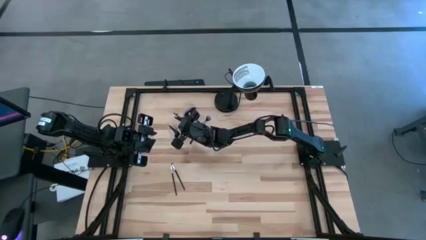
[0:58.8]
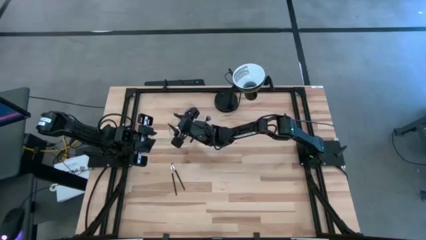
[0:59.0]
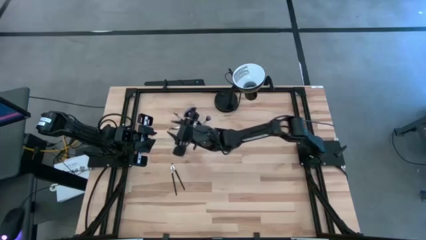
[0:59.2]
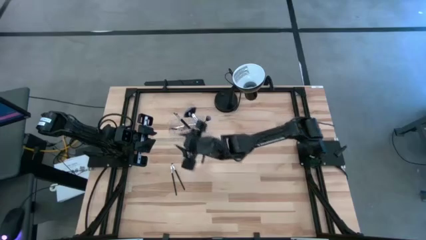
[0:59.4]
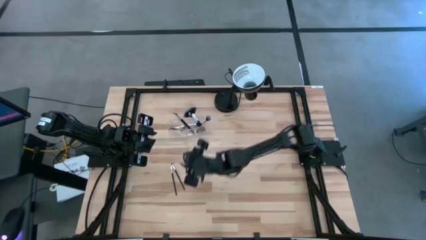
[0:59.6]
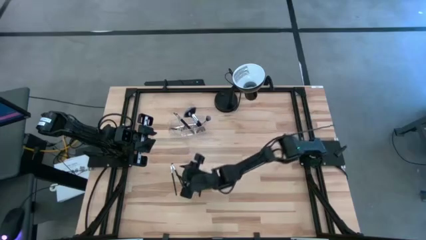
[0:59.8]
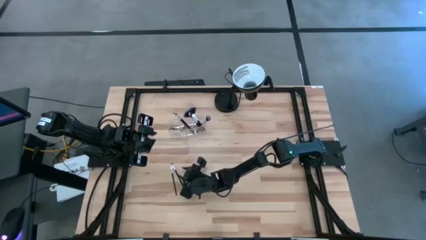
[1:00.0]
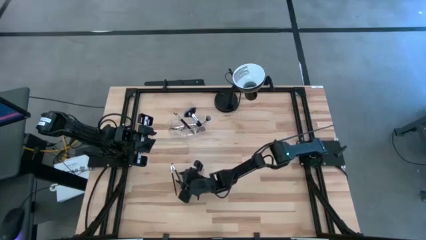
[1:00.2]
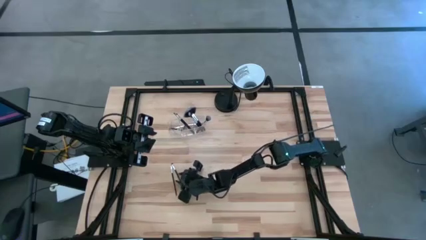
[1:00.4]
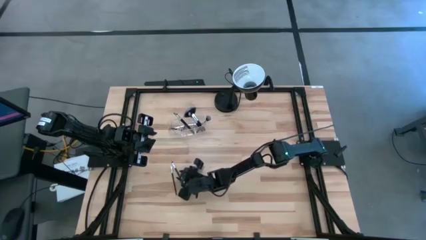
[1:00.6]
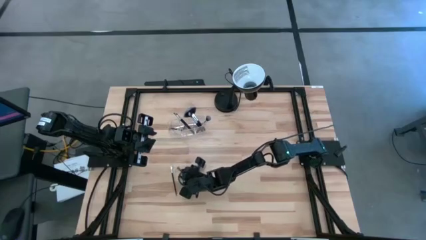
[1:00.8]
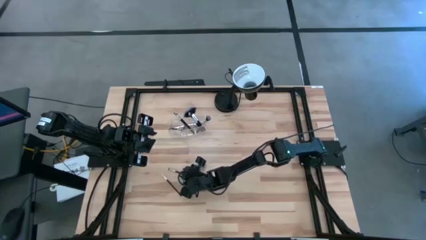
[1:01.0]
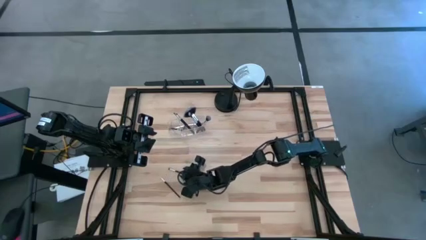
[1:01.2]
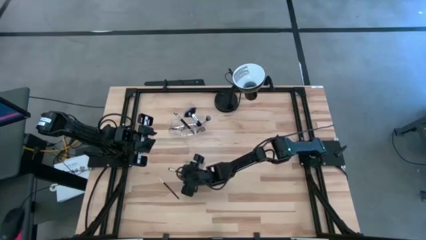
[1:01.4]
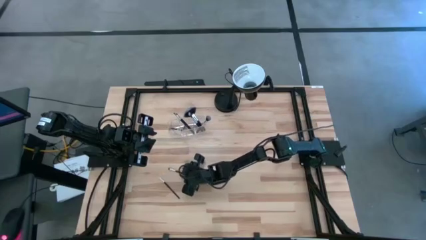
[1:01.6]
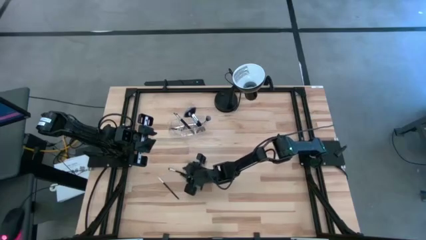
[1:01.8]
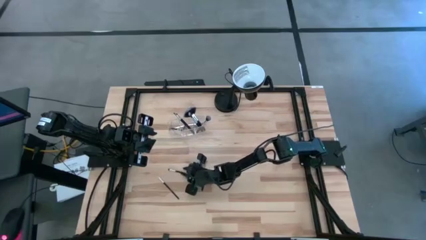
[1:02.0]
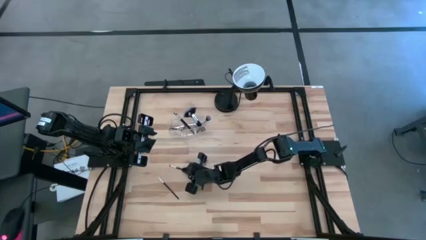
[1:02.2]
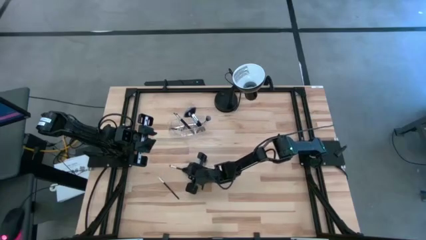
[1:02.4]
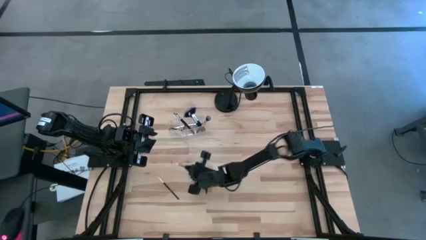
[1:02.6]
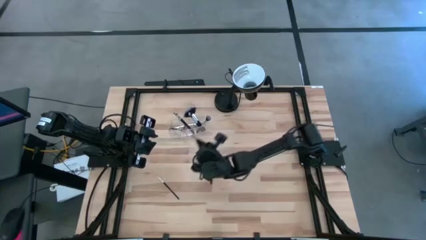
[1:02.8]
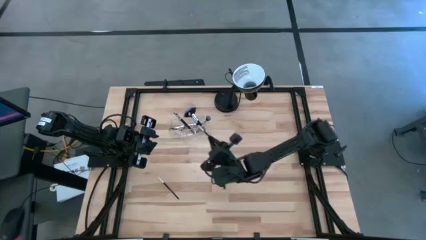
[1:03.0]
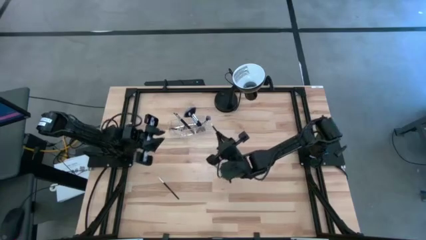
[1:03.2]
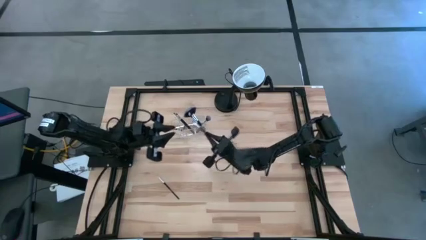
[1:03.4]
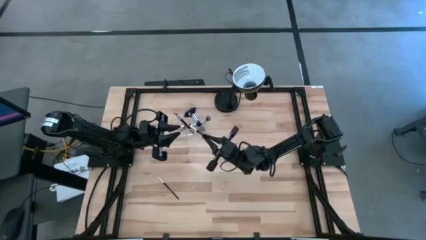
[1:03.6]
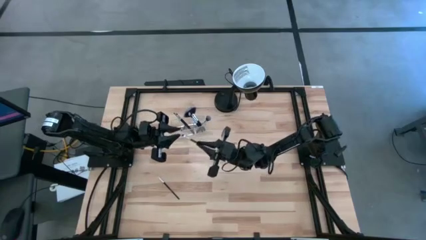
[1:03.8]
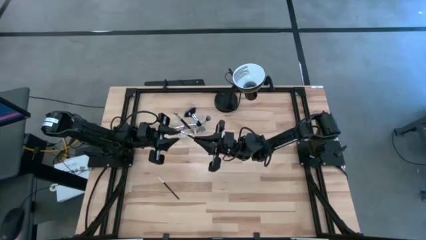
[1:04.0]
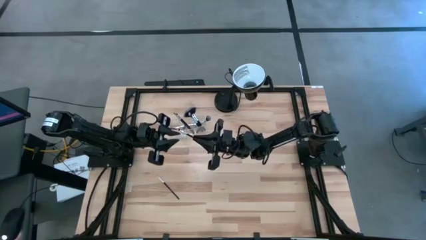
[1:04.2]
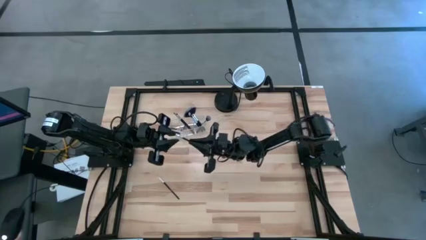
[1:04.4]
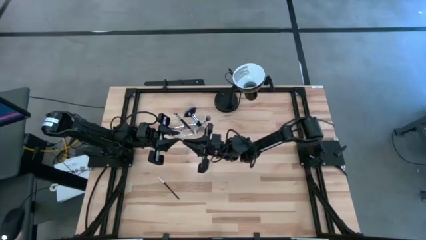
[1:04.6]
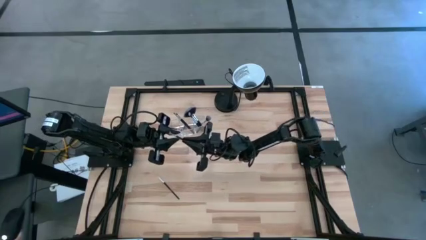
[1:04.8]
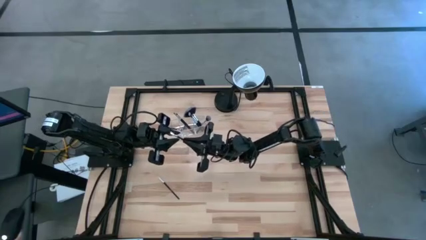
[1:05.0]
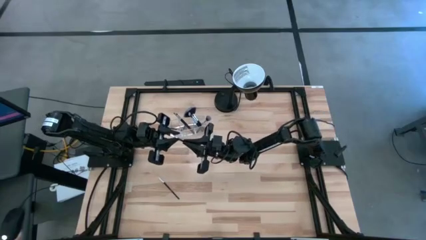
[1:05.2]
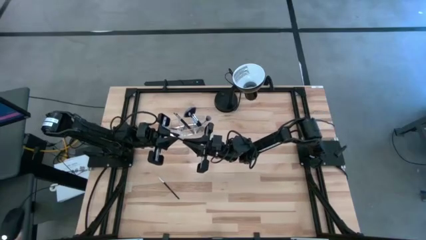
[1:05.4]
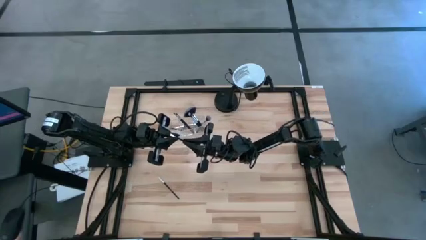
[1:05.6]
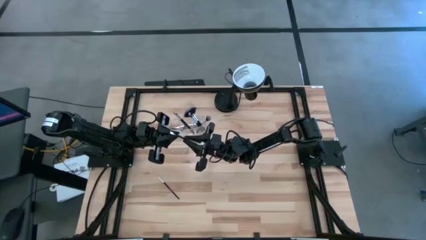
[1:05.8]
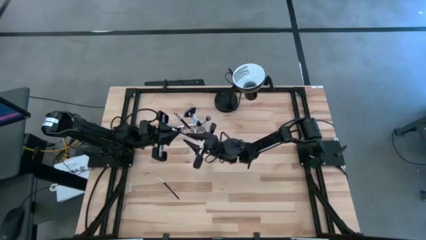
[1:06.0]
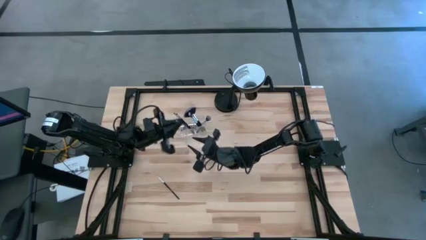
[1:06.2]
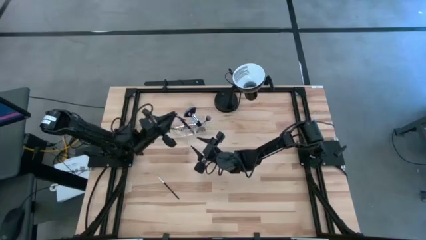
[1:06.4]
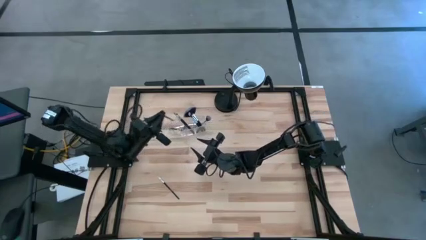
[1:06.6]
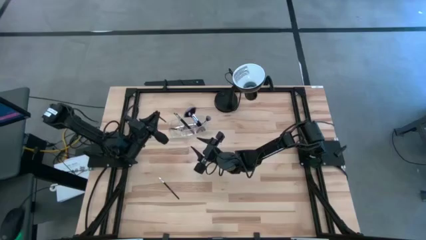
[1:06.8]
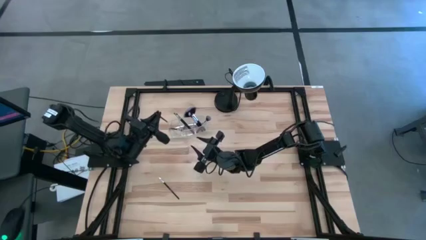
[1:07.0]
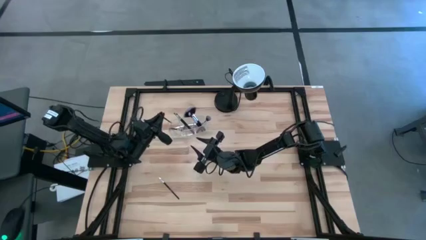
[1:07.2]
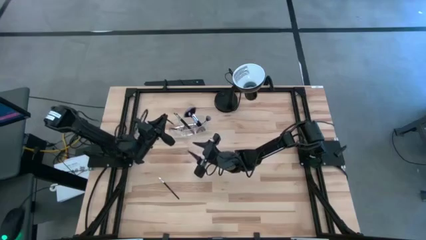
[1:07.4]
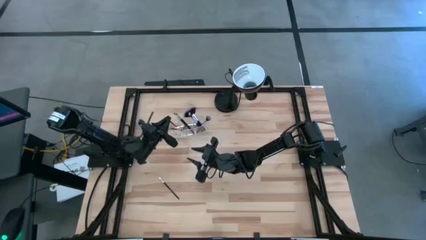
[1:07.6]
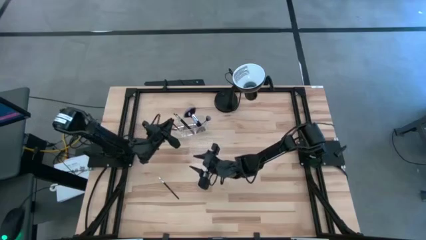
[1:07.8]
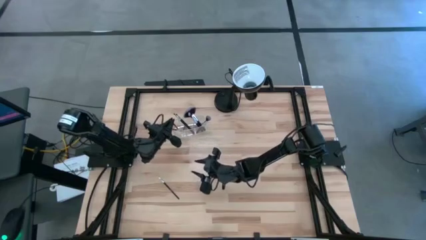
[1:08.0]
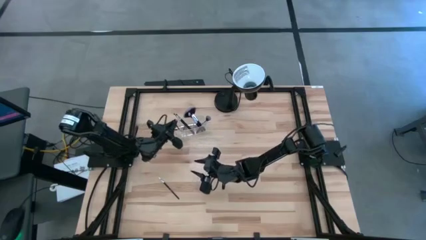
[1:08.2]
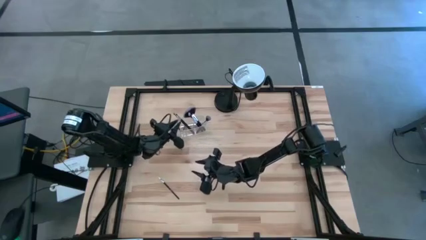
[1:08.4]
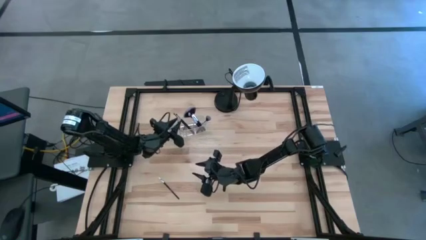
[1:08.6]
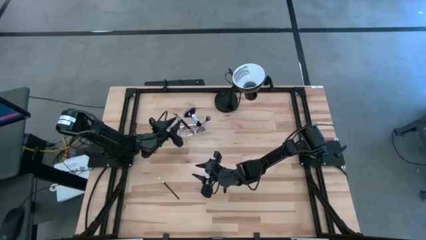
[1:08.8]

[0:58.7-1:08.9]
Task: Put items in baskets/containers
Put the black eyeshadow brush into the transparent organizer

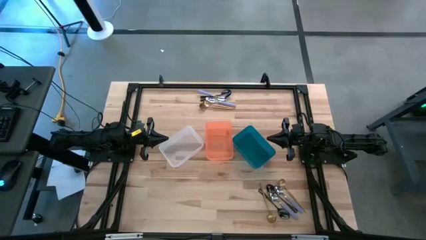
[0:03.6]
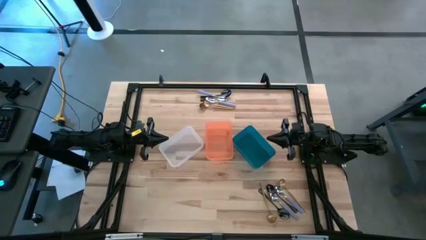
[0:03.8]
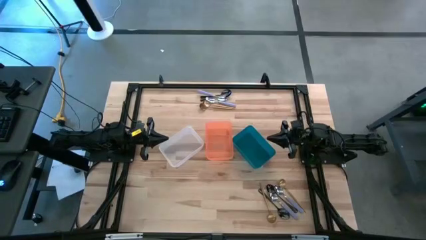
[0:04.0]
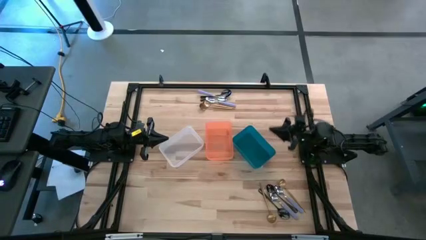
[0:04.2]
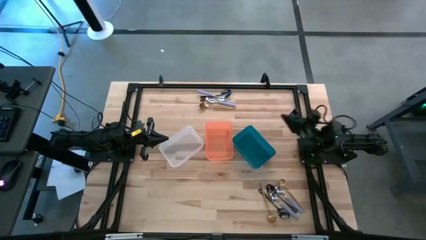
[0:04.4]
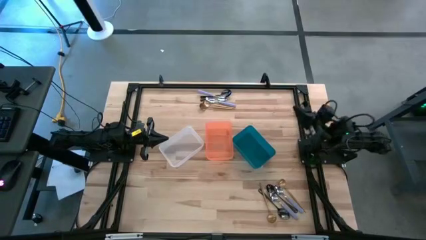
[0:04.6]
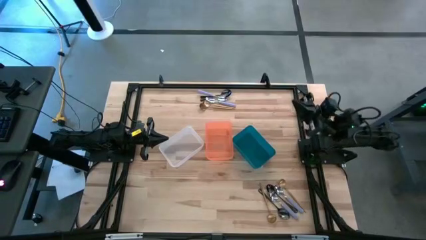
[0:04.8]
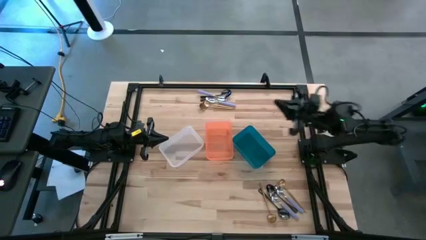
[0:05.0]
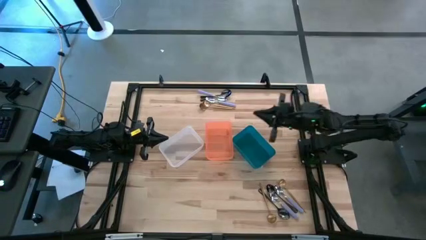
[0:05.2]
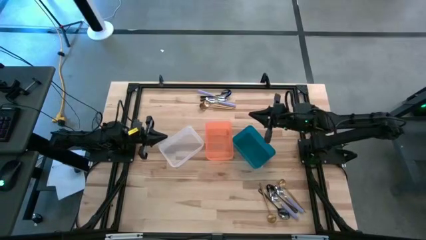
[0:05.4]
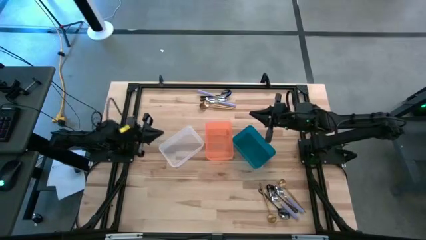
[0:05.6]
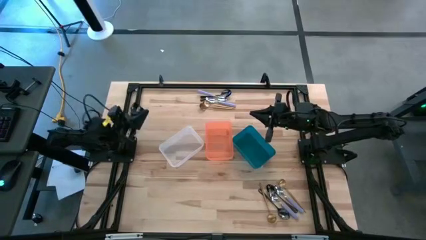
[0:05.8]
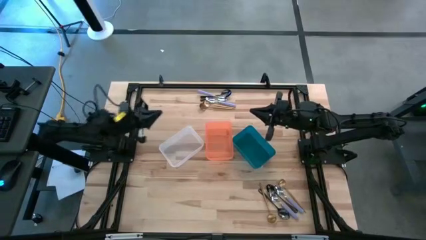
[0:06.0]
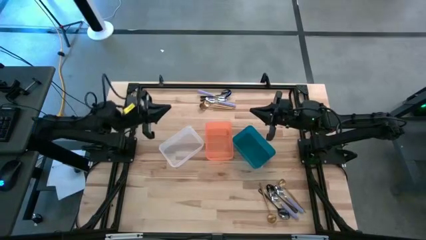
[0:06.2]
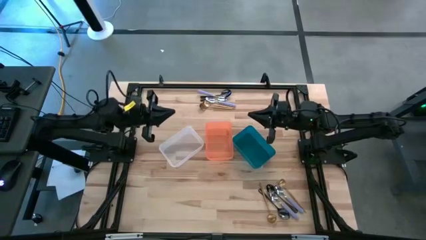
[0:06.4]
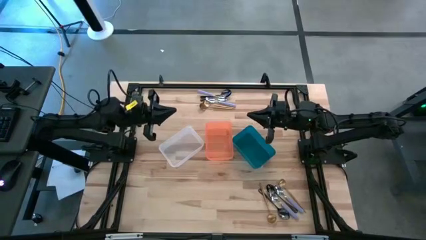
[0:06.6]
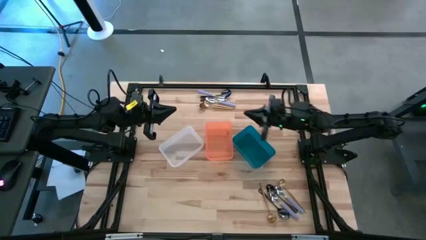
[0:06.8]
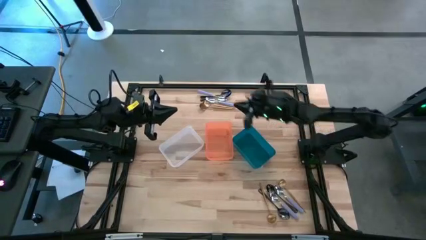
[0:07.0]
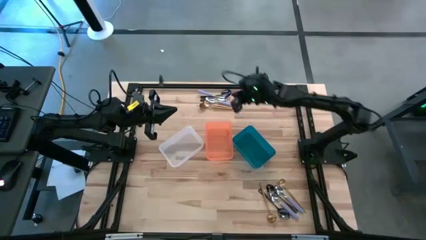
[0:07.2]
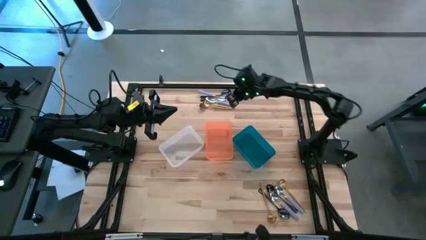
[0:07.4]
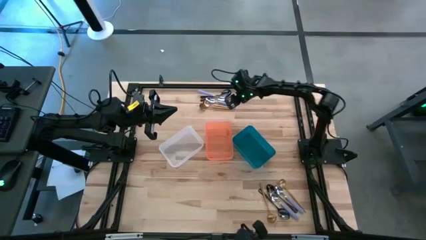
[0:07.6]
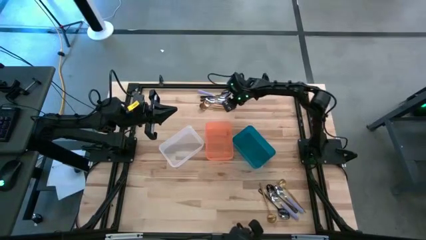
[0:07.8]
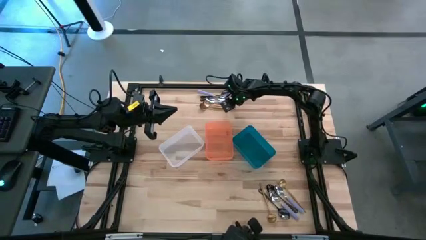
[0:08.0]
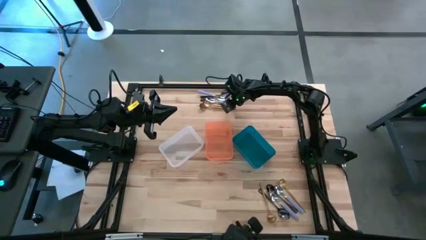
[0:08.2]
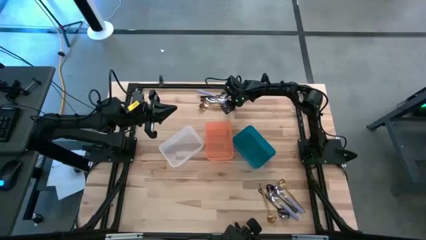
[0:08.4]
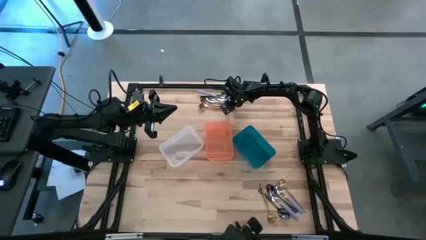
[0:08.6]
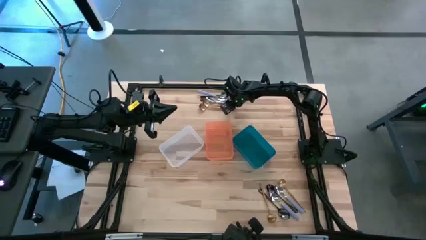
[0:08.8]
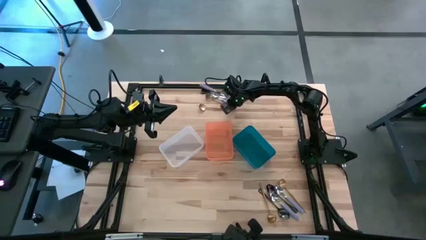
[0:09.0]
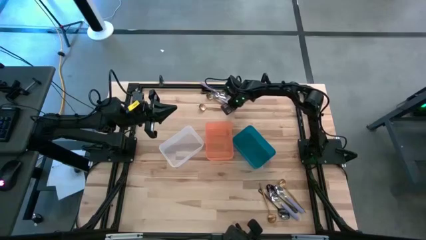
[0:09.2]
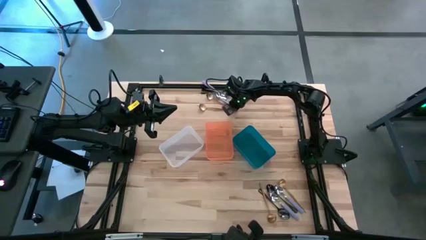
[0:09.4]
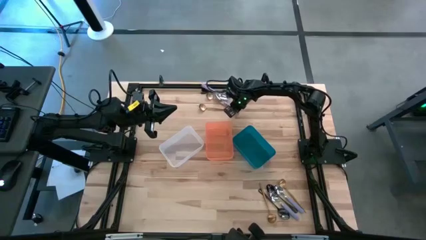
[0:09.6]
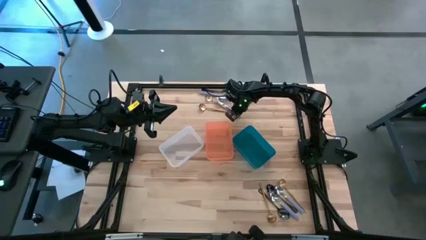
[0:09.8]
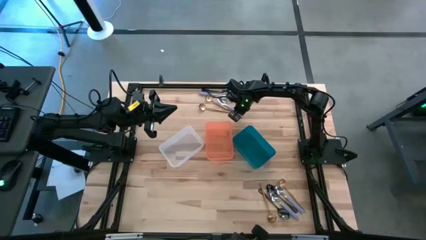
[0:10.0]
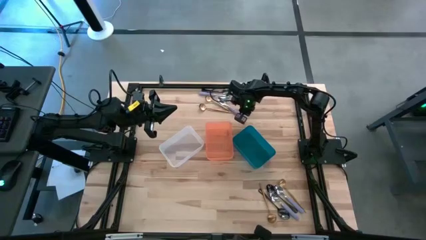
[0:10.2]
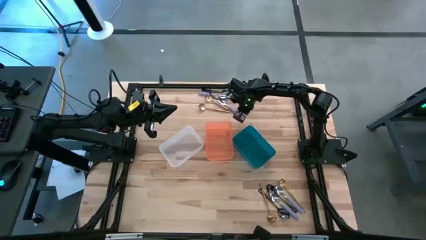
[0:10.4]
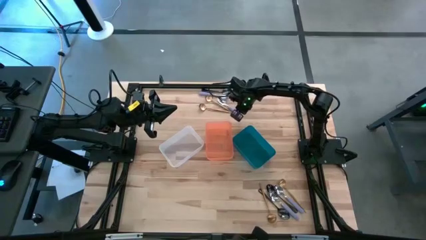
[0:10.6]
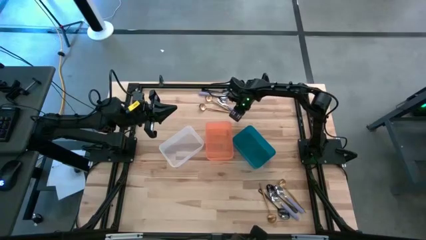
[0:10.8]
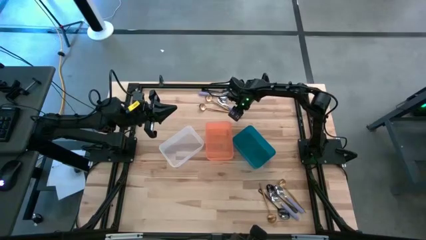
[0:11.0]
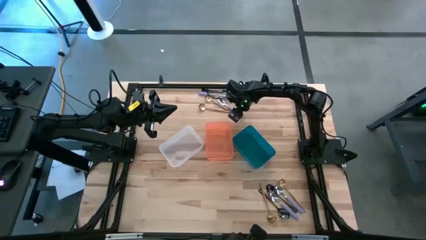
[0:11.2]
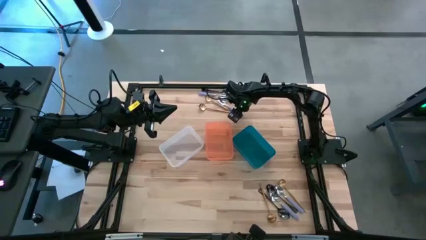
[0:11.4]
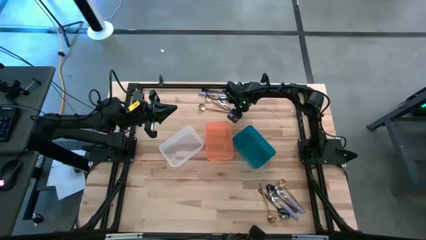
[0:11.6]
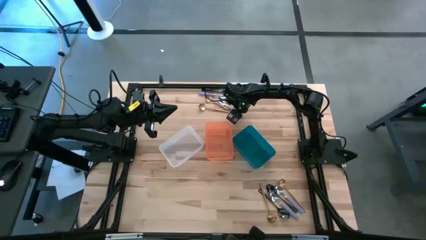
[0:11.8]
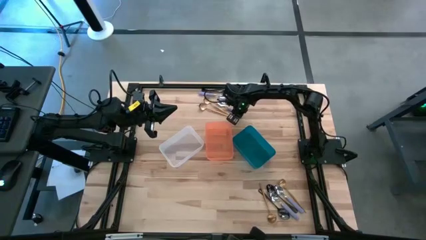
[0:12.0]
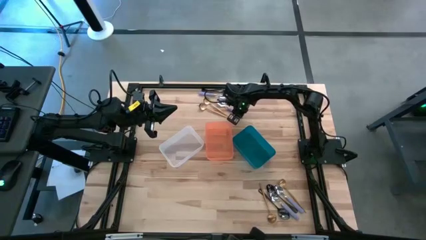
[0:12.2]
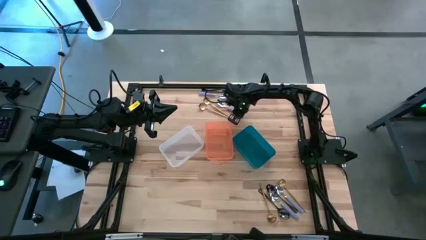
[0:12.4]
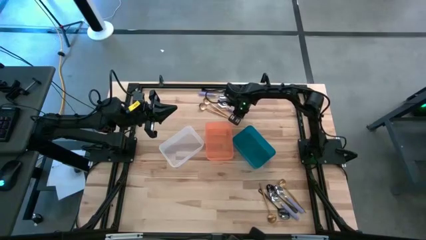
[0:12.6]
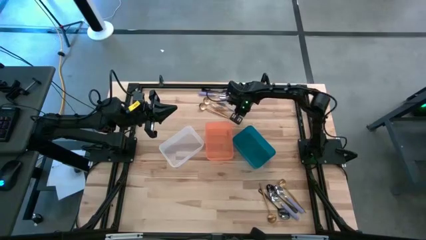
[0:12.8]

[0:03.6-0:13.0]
Task: Sort silverware by color (type)
Put the purple spoon into the white bin
